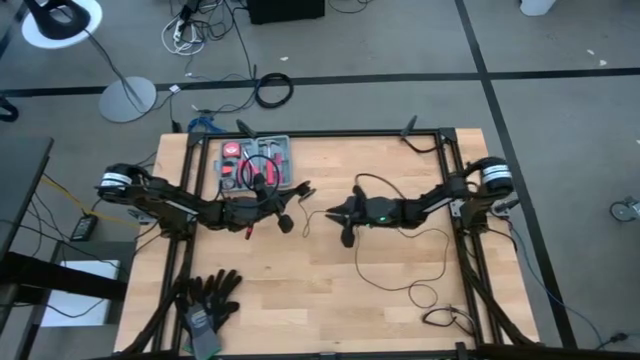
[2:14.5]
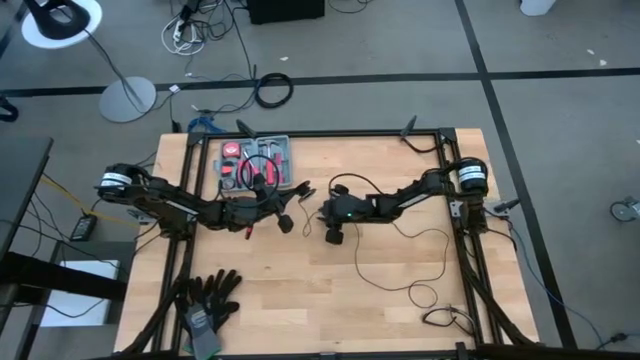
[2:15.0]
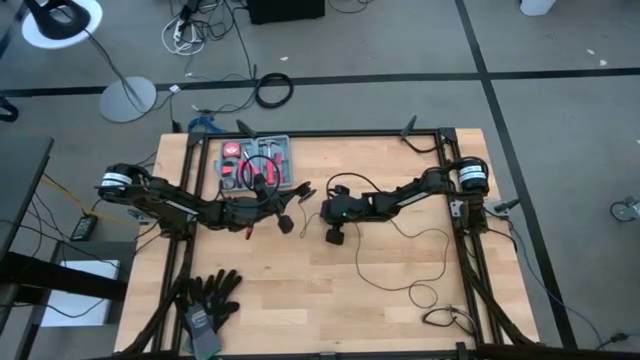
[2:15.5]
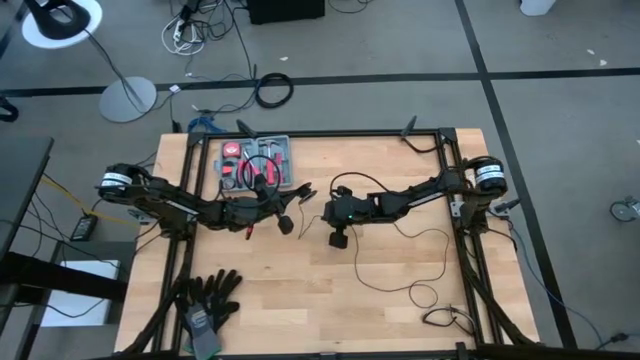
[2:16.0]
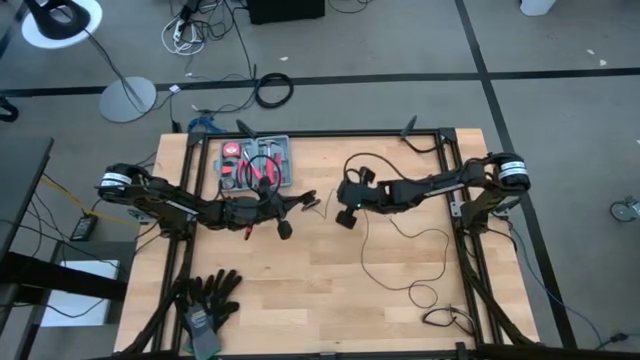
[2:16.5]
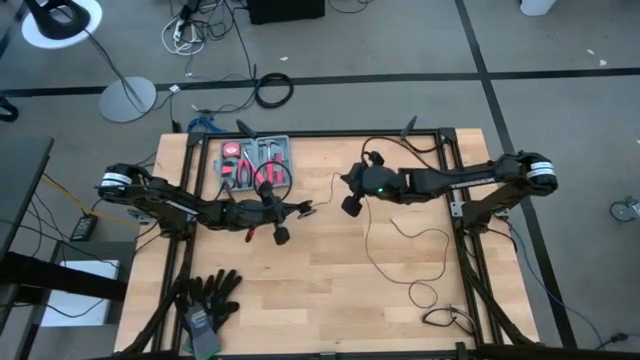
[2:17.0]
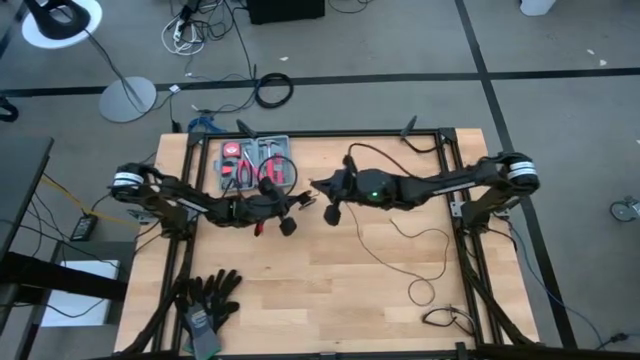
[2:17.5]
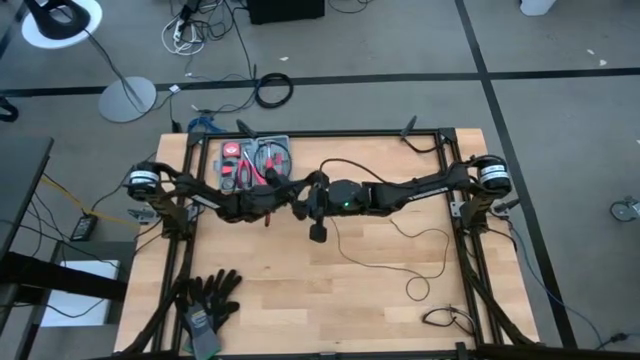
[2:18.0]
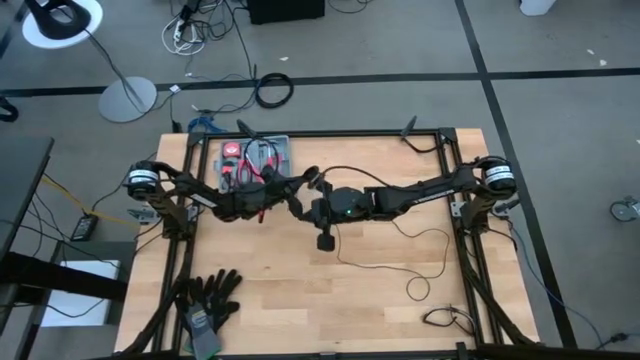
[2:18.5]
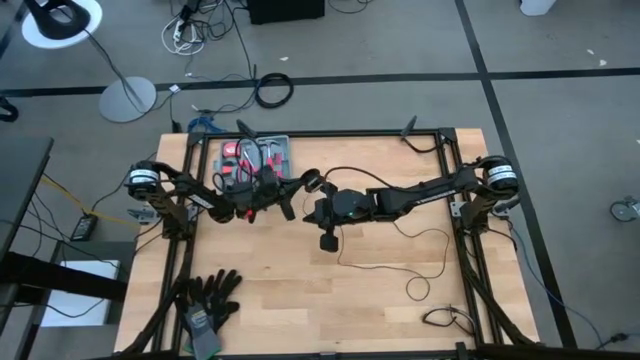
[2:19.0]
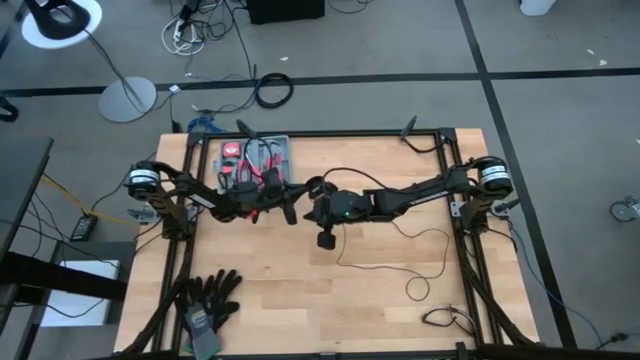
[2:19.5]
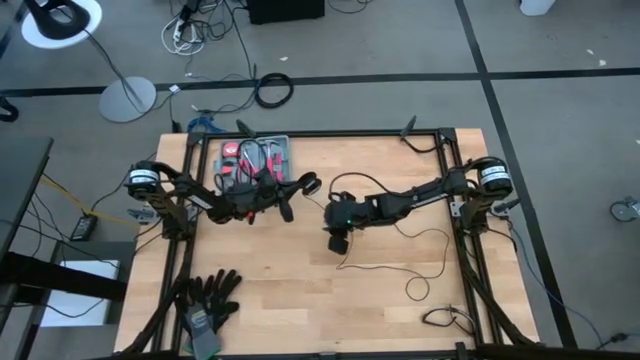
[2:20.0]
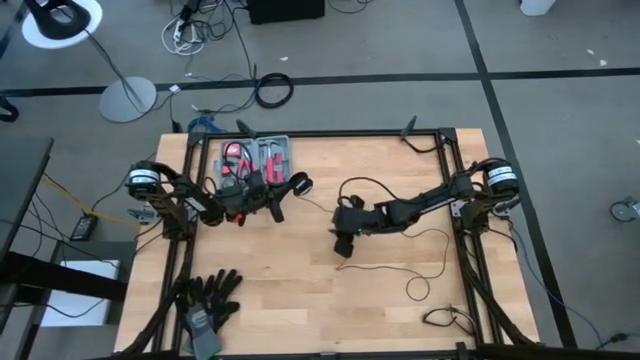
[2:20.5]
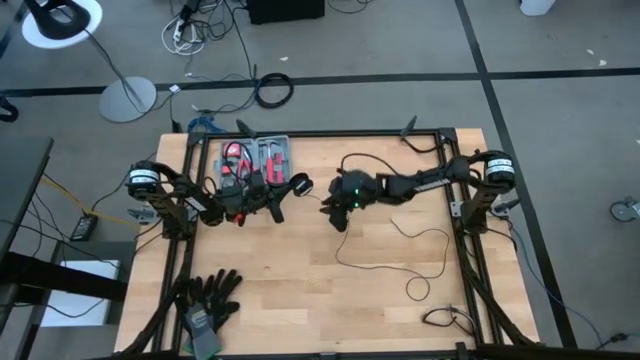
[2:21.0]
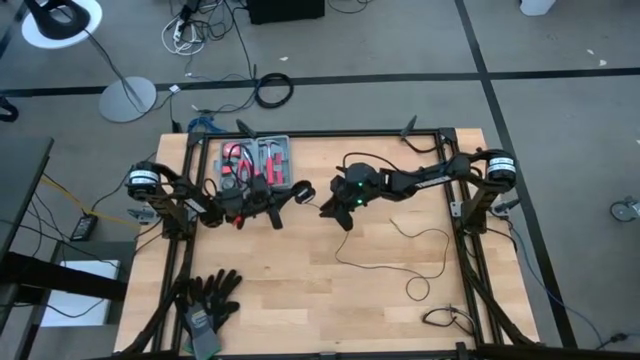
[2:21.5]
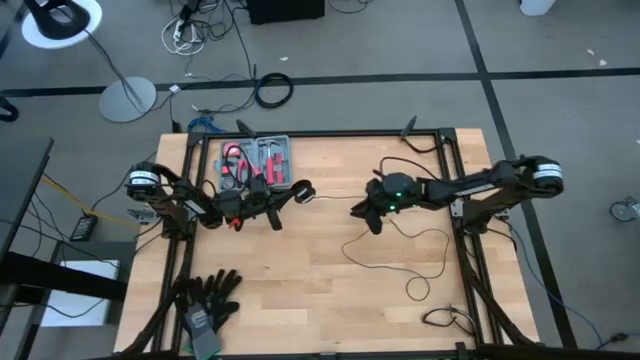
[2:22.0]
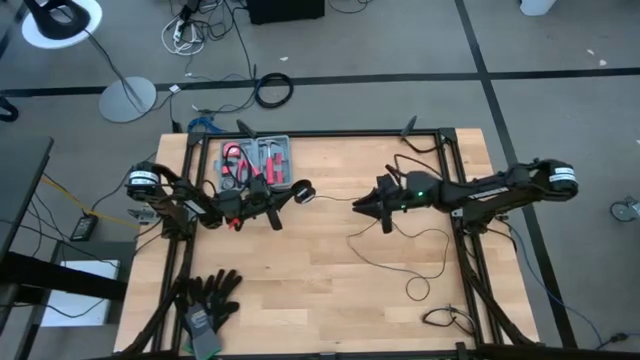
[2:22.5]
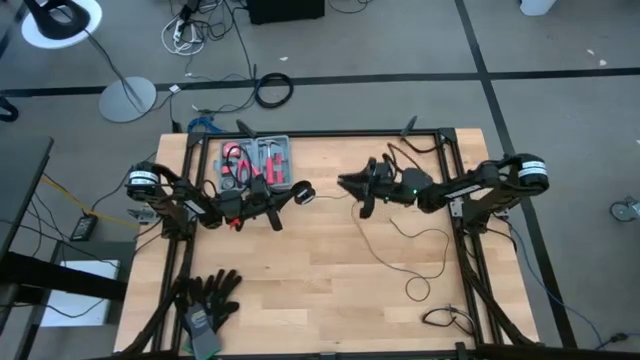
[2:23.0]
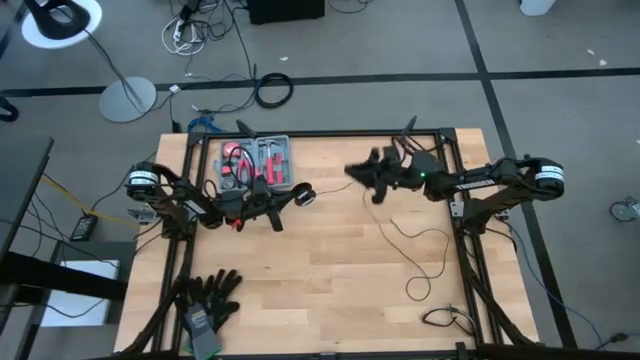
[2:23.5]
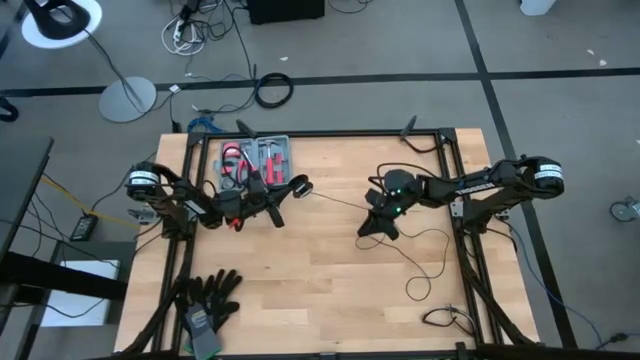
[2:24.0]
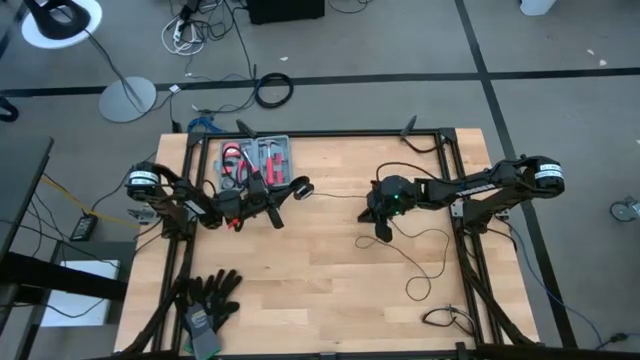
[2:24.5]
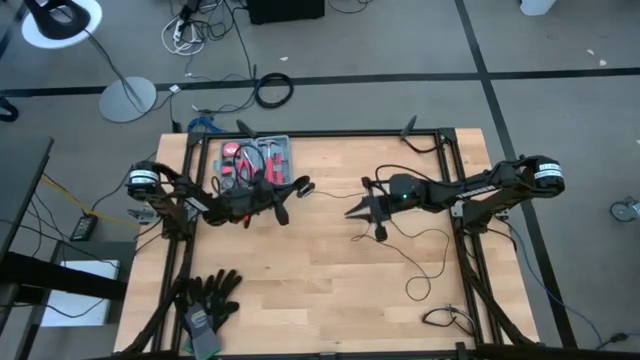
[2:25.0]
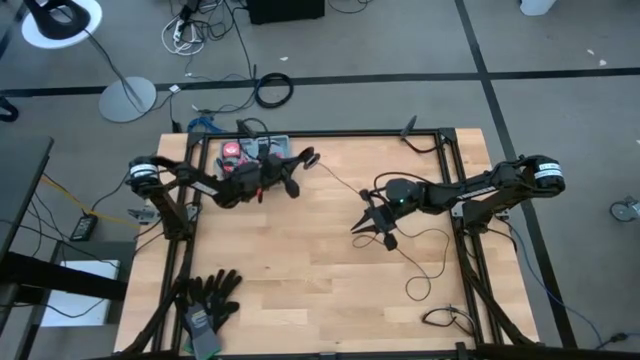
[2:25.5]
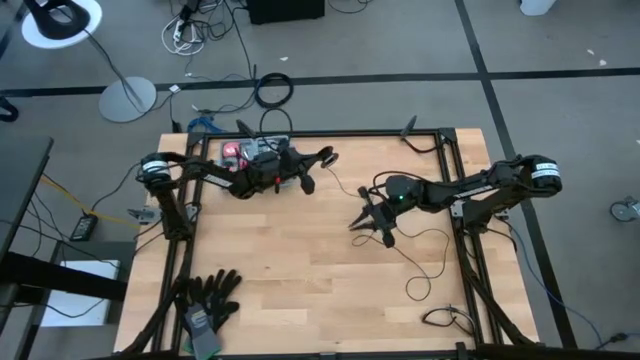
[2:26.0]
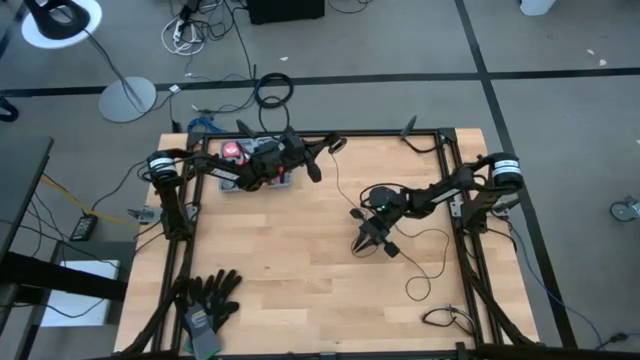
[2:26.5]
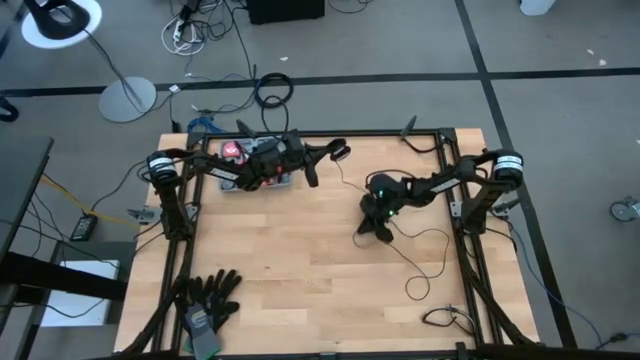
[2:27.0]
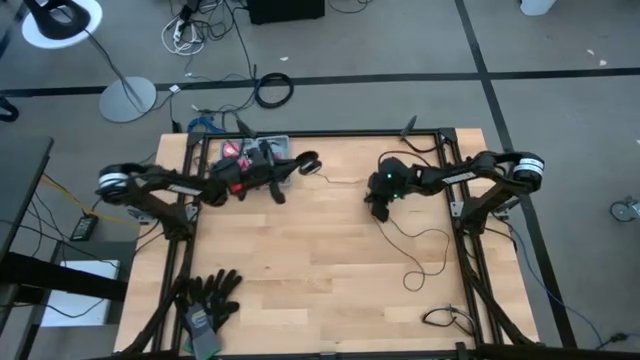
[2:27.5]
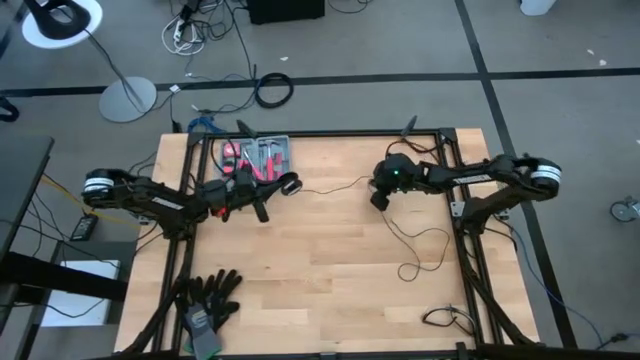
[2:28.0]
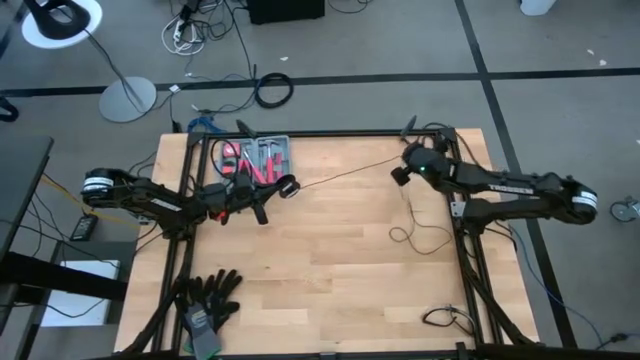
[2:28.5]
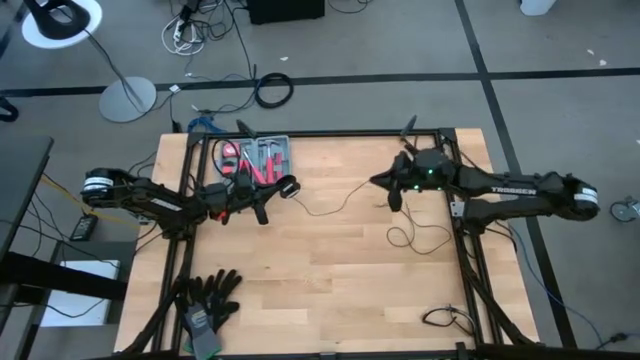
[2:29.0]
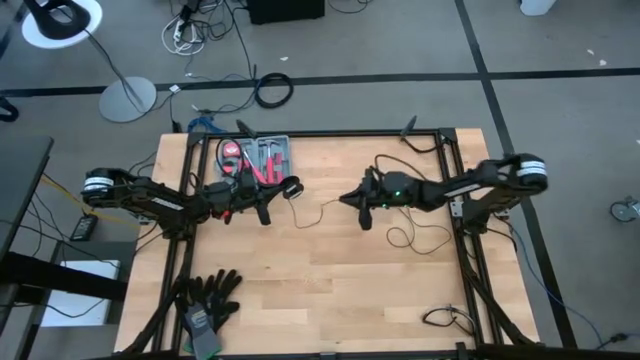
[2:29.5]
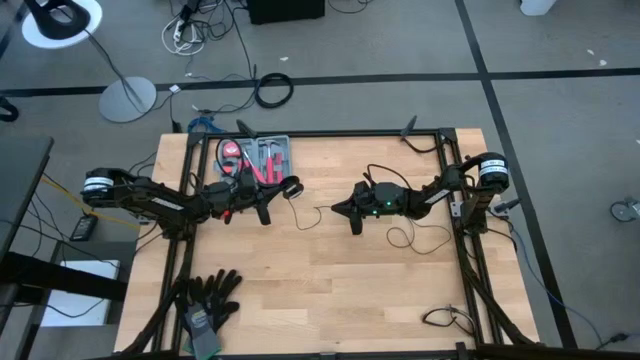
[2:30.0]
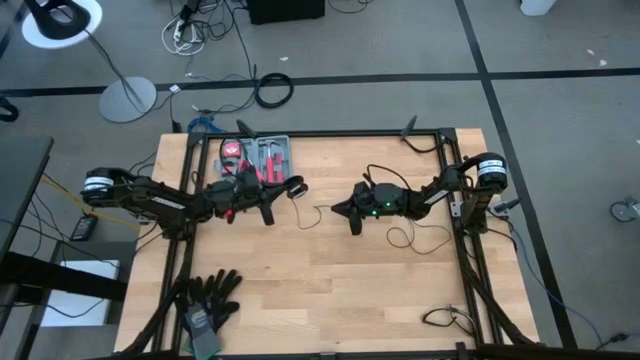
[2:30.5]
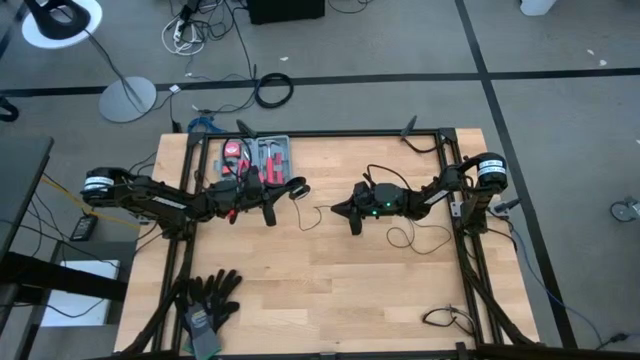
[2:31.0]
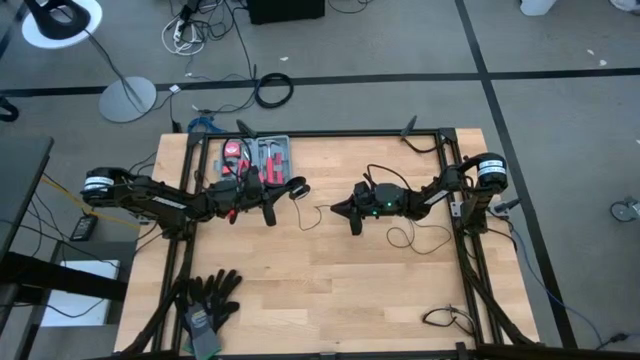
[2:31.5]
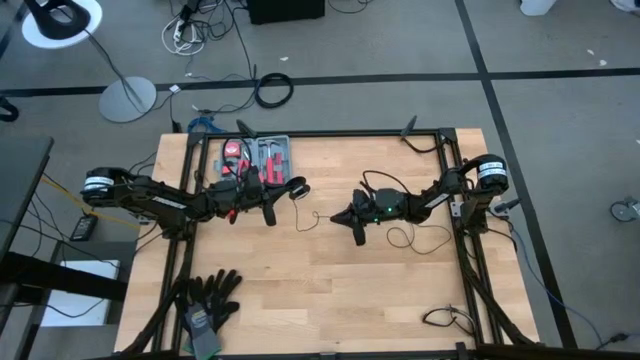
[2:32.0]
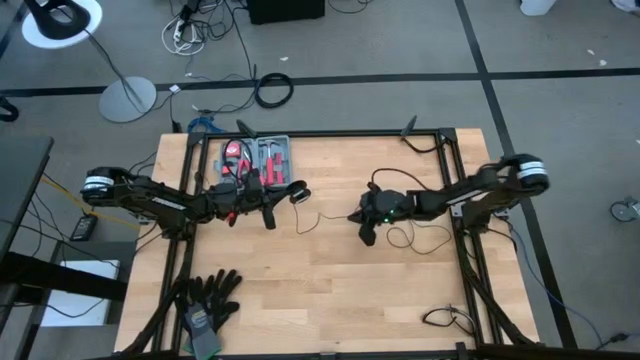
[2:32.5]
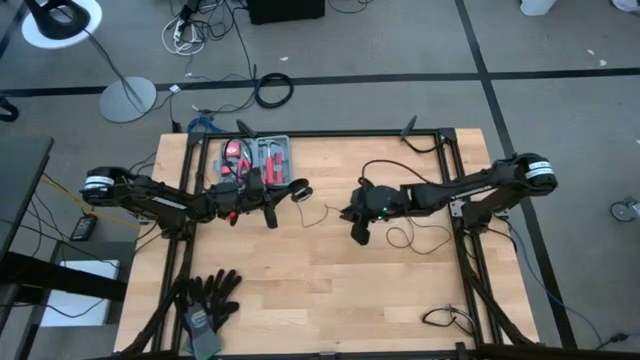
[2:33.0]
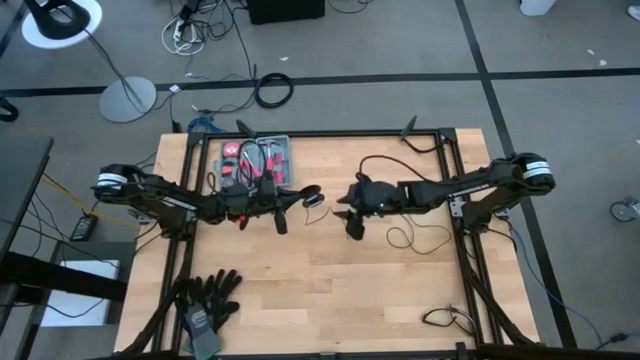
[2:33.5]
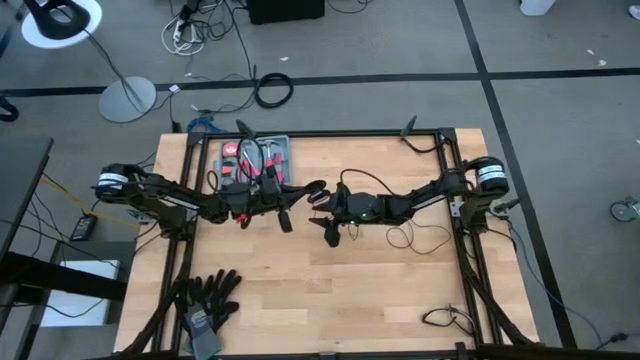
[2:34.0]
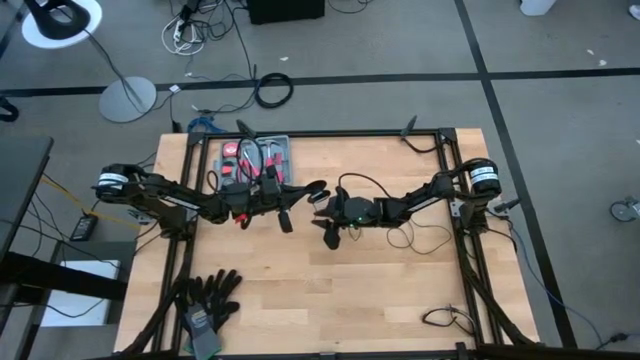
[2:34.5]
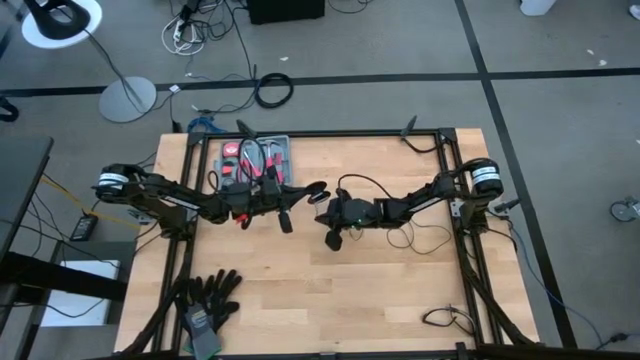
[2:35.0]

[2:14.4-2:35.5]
Task: Coil cords
Coil the black cable wire on the spool
